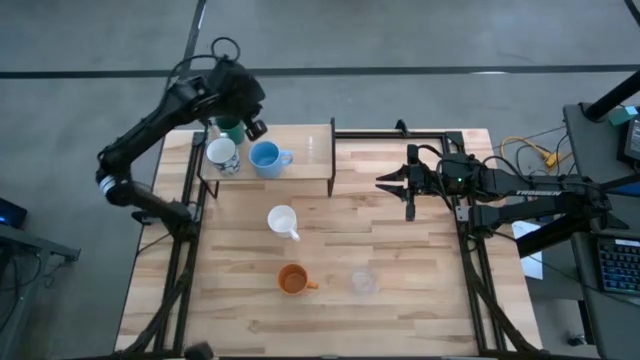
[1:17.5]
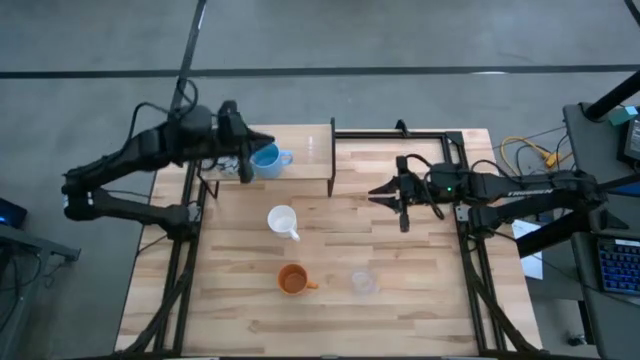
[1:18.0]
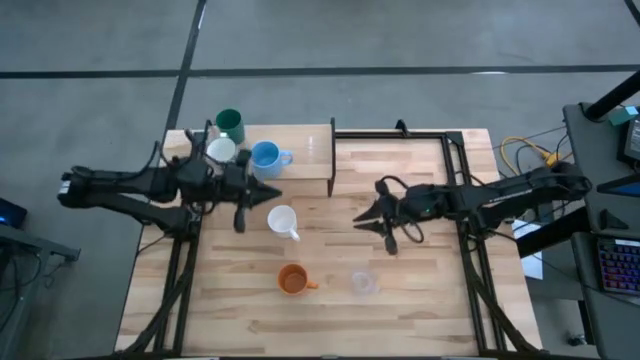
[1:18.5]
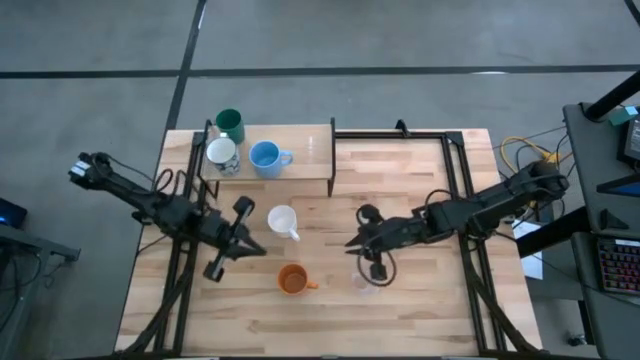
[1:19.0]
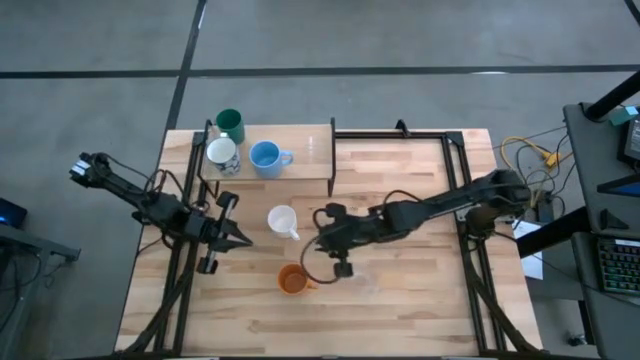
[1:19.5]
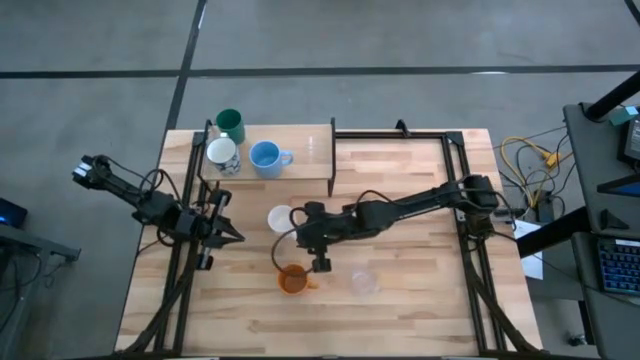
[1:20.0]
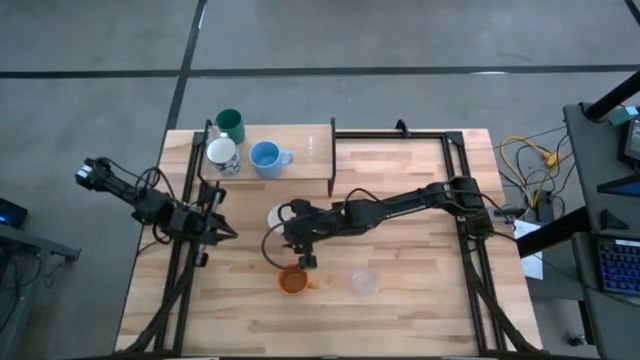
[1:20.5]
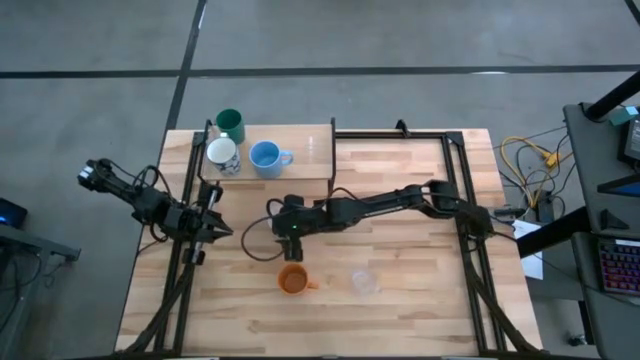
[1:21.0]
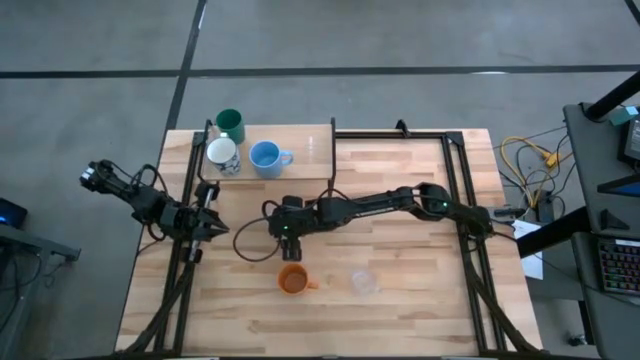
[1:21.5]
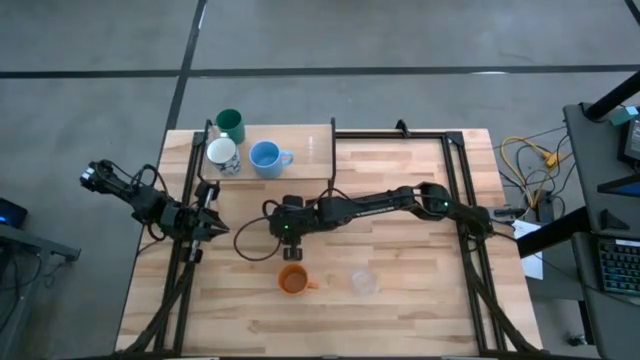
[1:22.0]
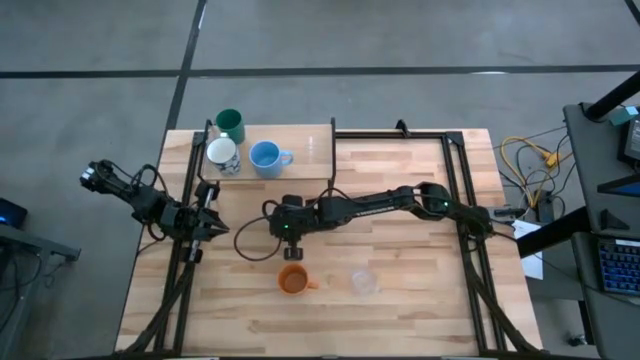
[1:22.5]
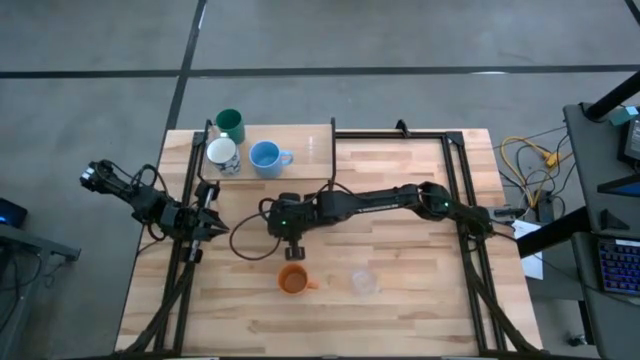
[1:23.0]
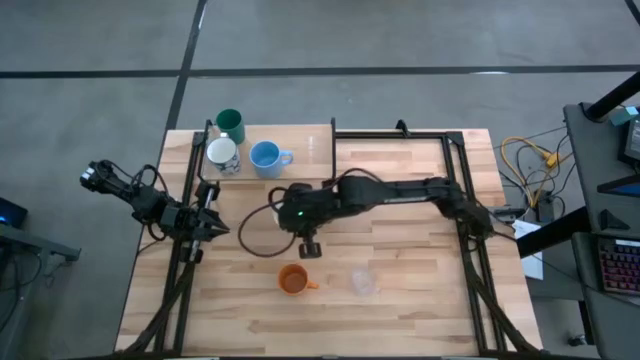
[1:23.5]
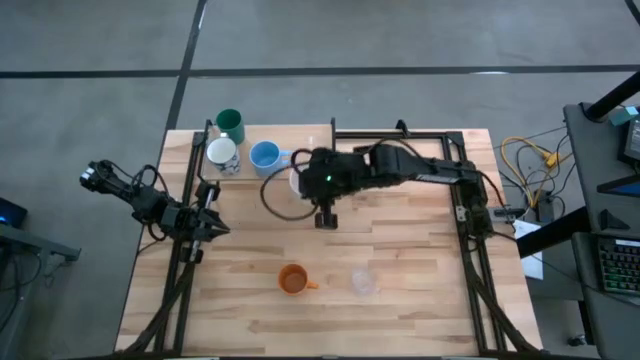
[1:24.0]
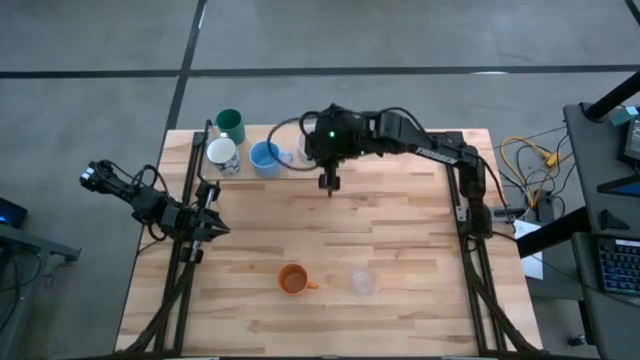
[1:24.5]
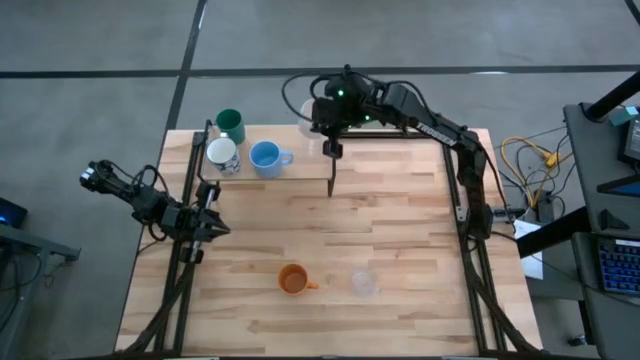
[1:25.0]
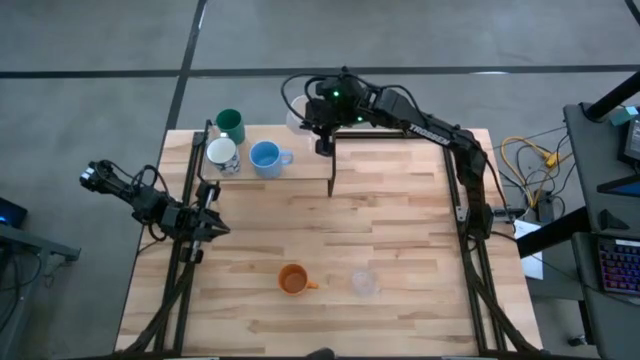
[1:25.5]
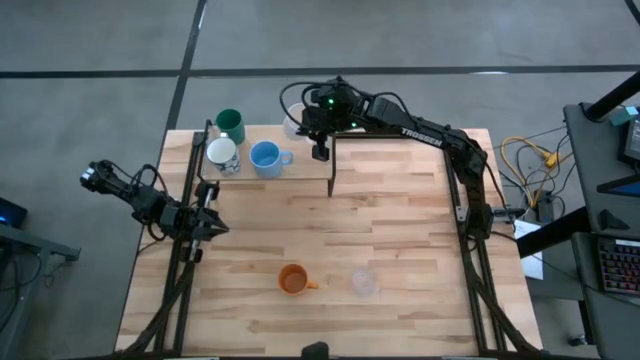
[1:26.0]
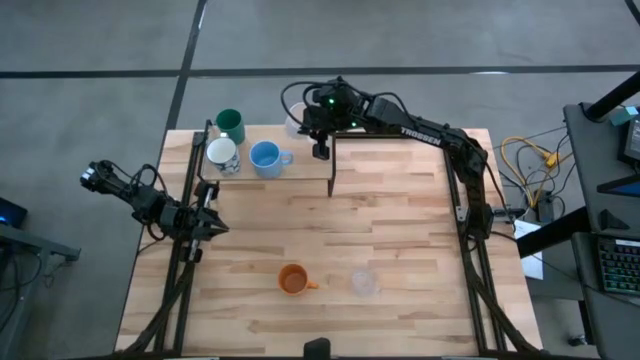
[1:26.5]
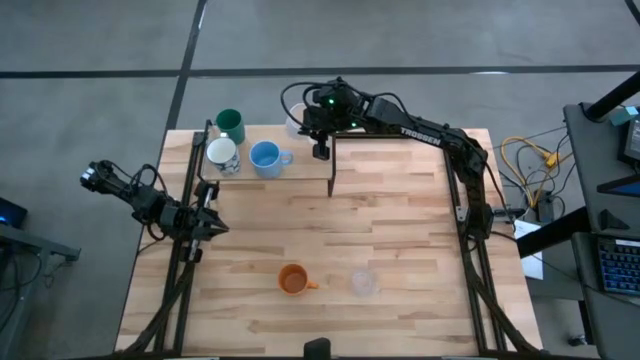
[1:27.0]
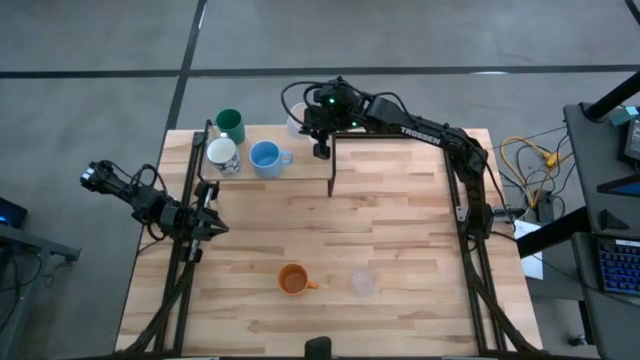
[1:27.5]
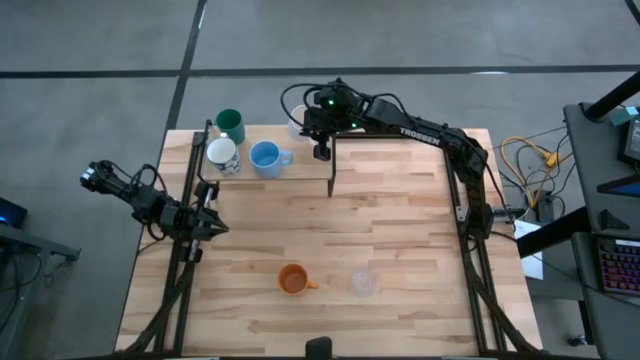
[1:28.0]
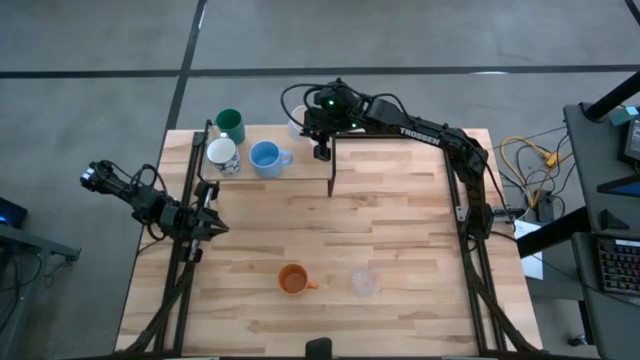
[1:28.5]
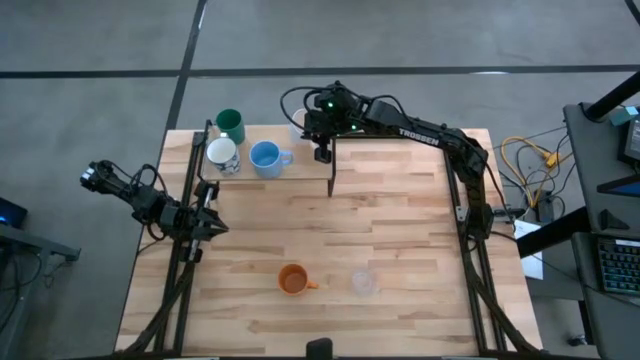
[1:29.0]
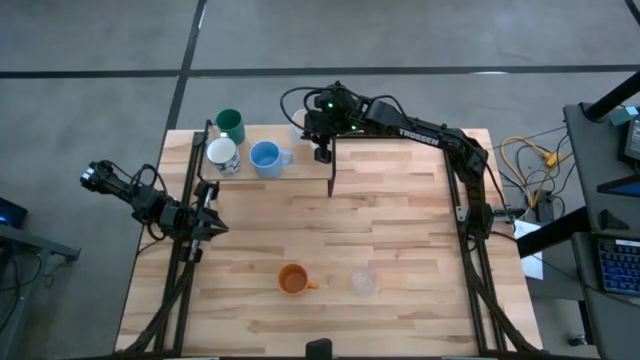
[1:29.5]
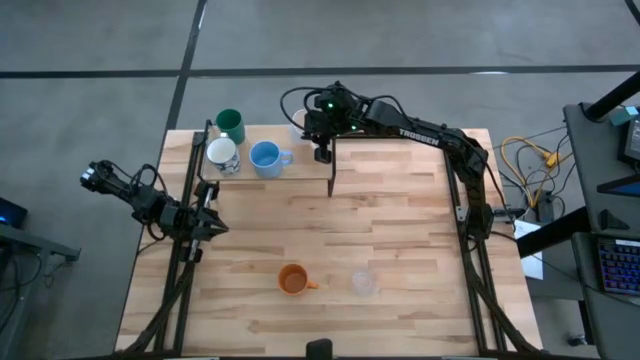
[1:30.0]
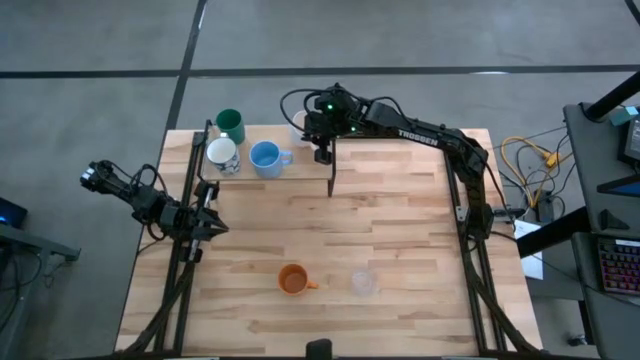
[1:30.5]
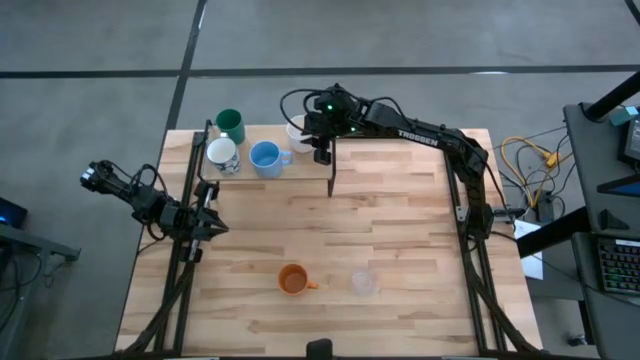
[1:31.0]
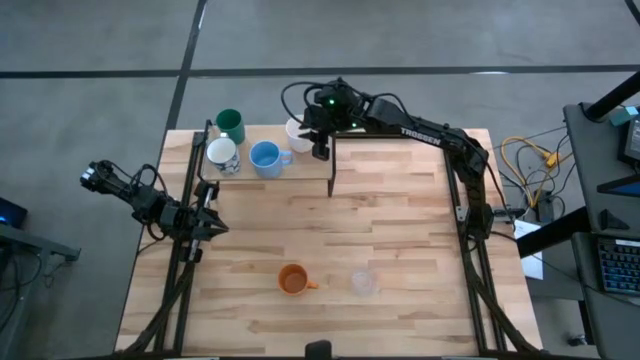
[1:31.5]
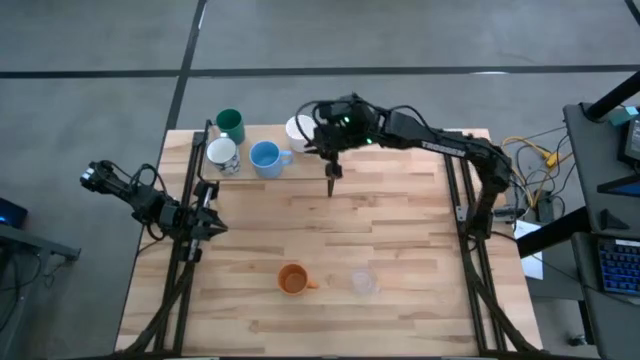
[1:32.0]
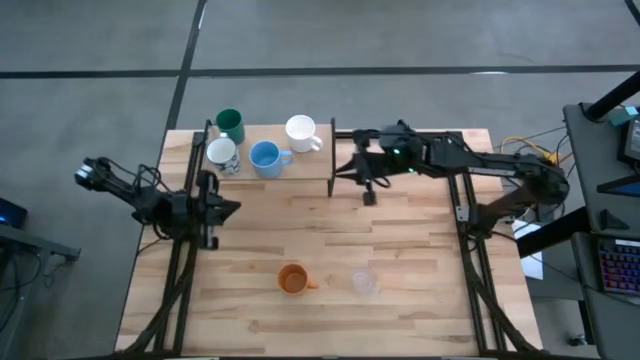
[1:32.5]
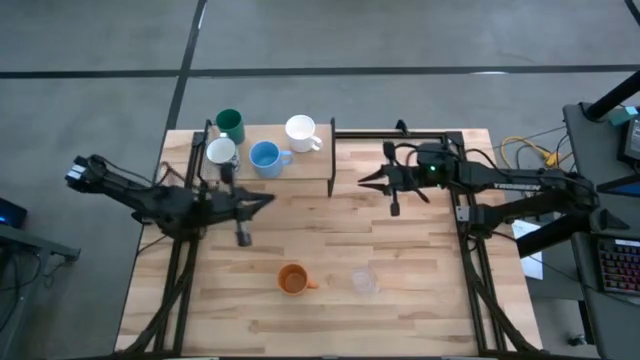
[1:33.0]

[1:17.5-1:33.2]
Task: Stack small to large cups/mugs on shelf
Put the white mug on the shelf

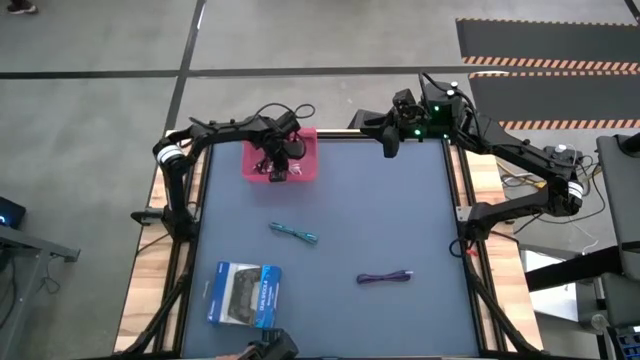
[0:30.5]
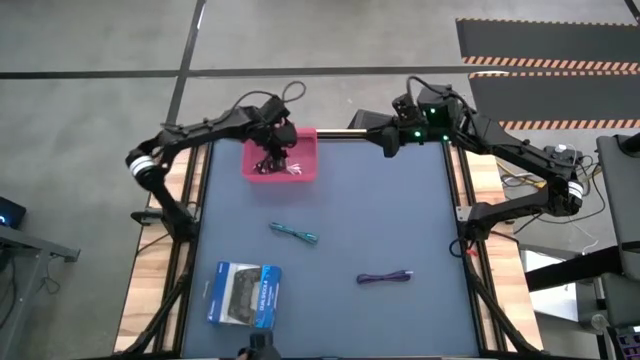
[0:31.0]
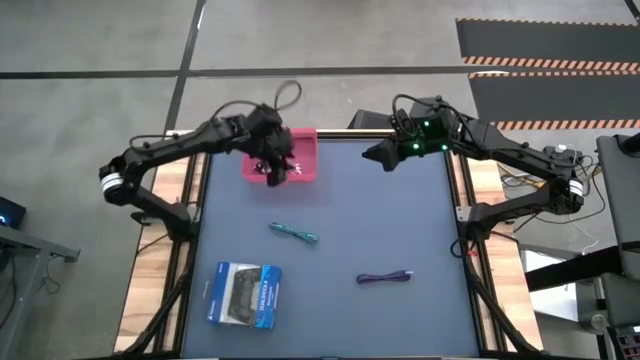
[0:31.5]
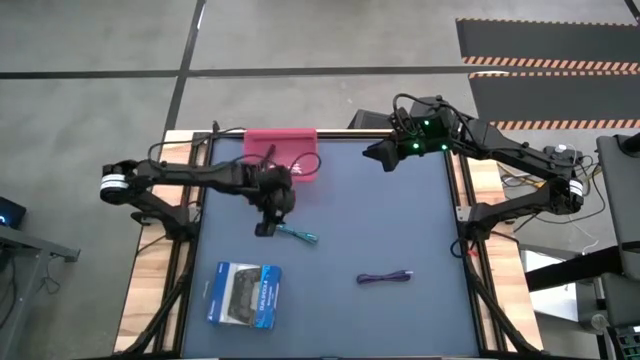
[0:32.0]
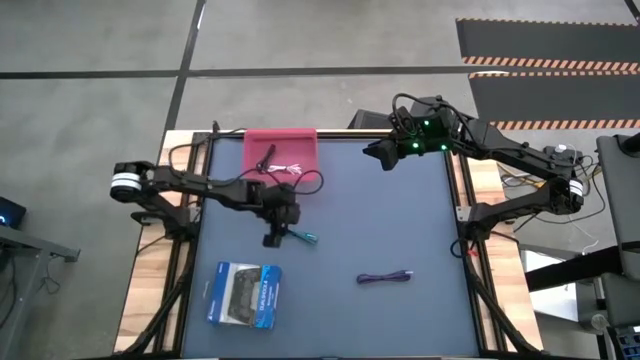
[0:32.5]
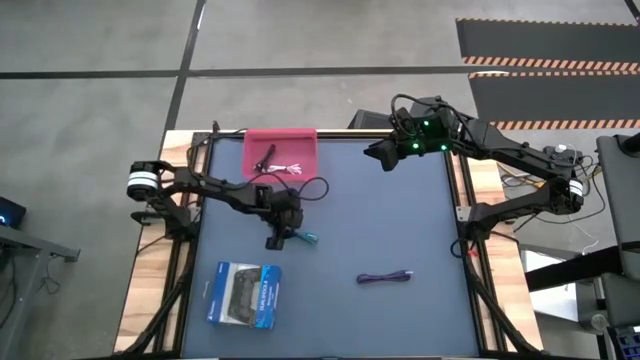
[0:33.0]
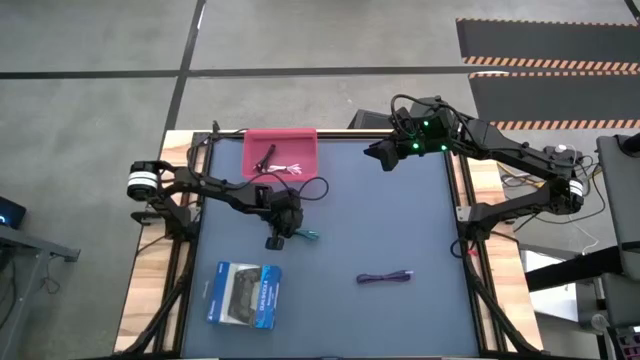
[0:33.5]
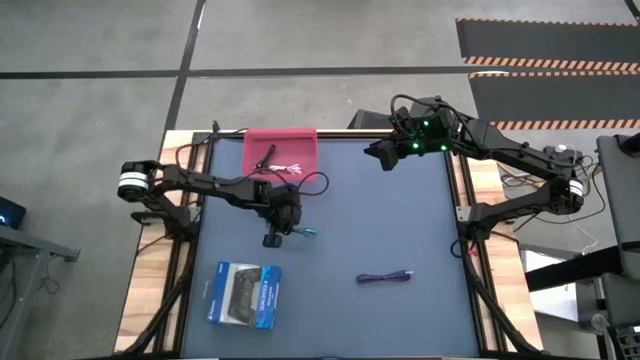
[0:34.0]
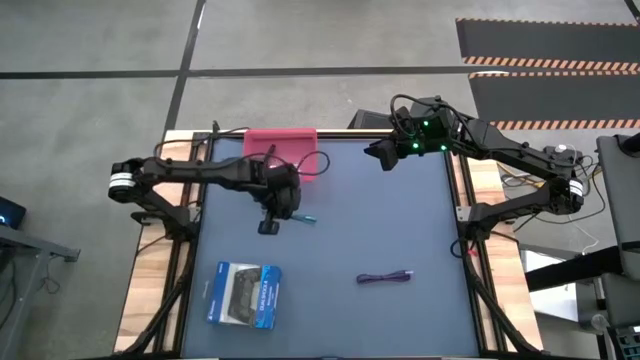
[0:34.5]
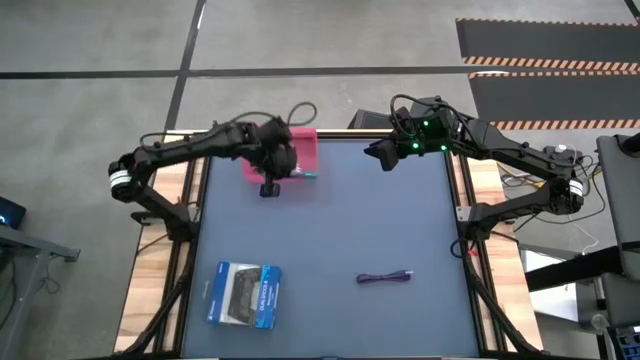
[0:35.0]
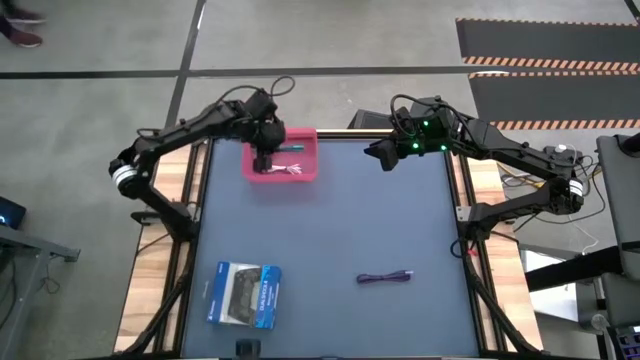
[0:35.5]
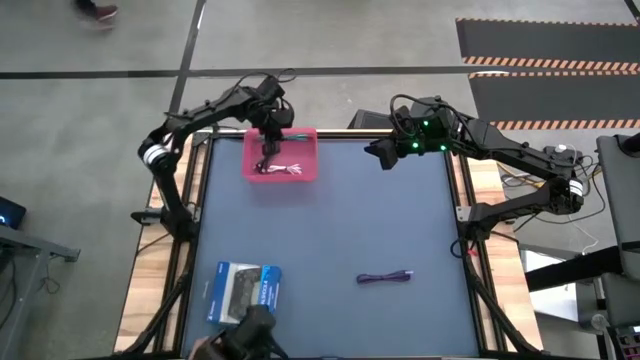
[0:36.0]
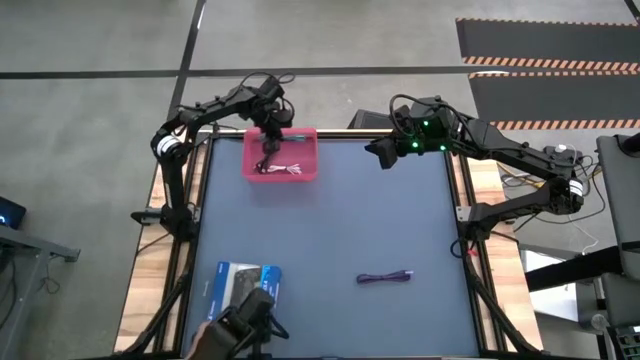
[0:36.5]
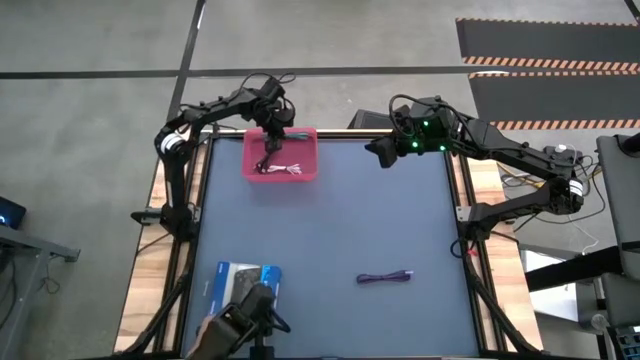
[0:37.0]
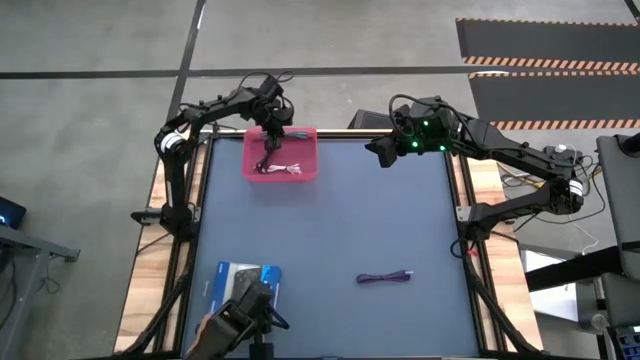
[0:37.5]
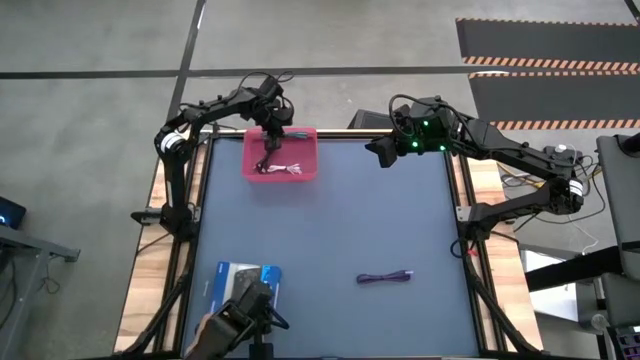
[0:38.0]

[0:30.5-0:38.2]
Task: Pick and place USB-C Cables
Put the blue charger cable into the pink bin
